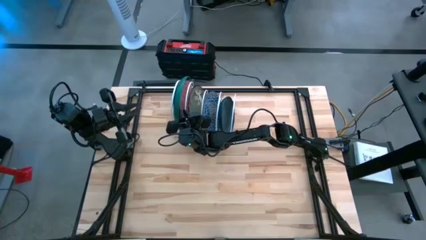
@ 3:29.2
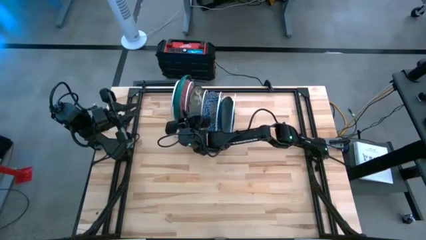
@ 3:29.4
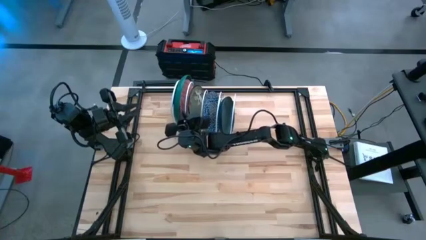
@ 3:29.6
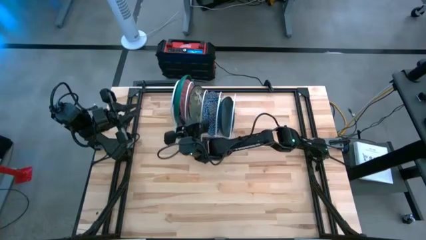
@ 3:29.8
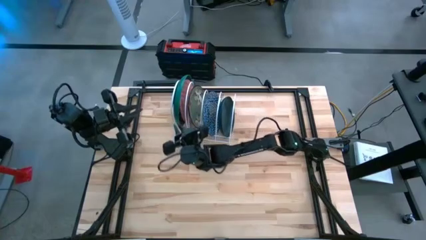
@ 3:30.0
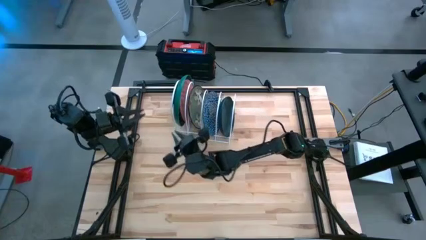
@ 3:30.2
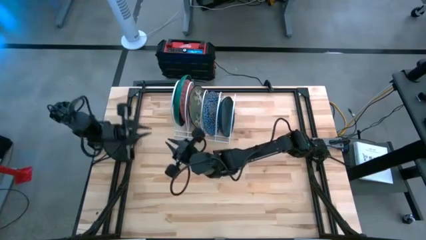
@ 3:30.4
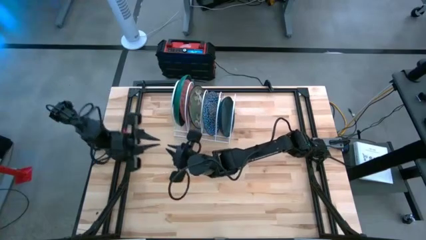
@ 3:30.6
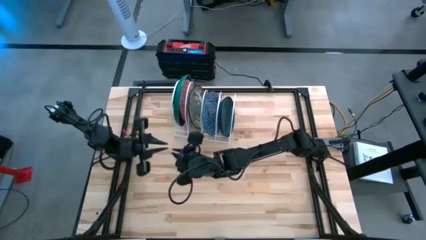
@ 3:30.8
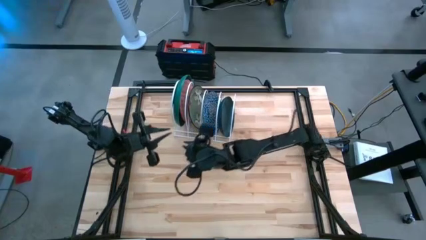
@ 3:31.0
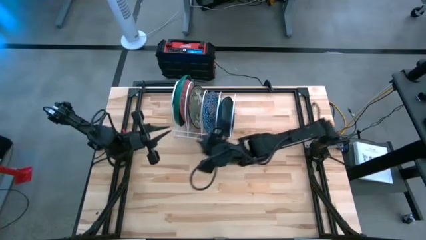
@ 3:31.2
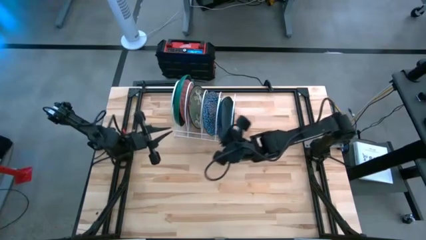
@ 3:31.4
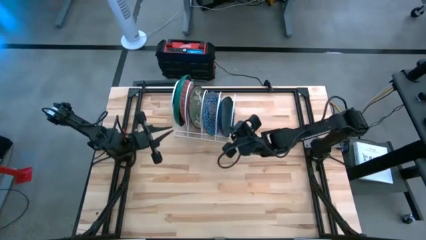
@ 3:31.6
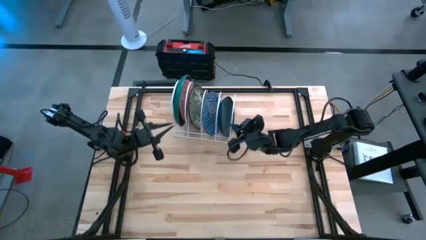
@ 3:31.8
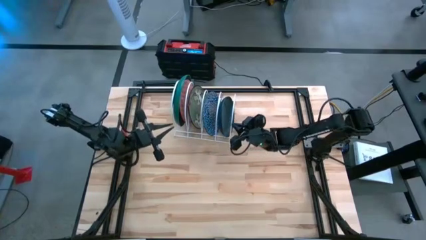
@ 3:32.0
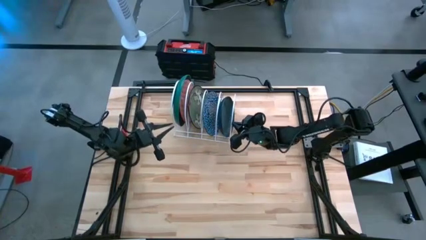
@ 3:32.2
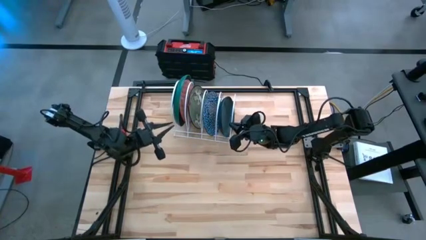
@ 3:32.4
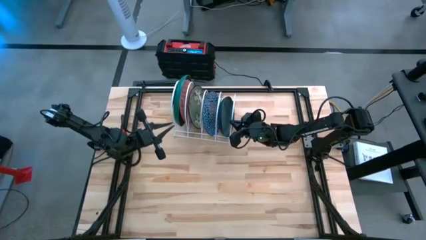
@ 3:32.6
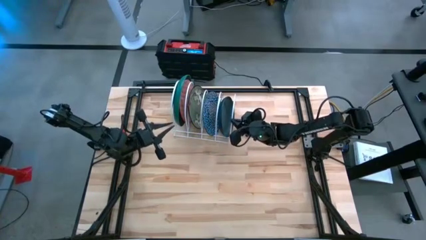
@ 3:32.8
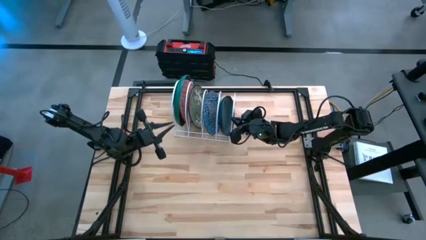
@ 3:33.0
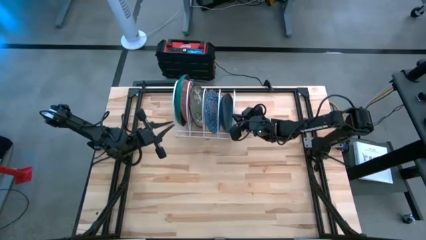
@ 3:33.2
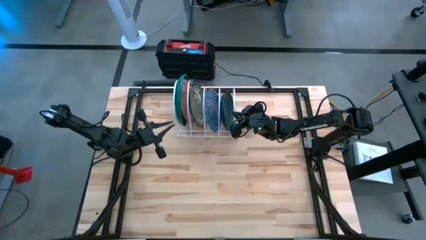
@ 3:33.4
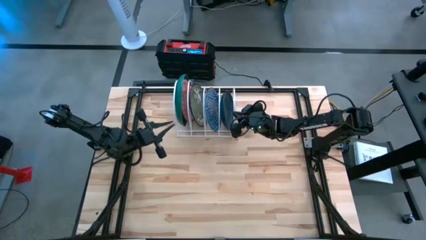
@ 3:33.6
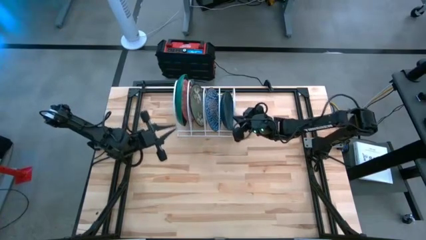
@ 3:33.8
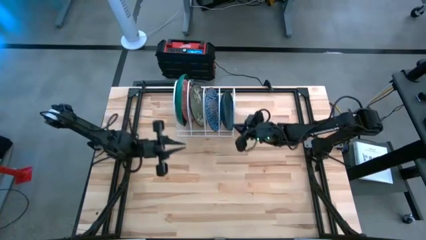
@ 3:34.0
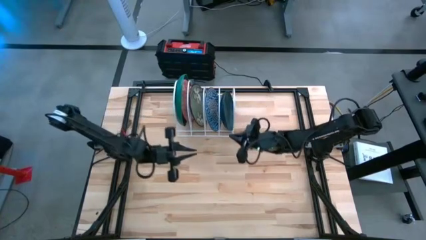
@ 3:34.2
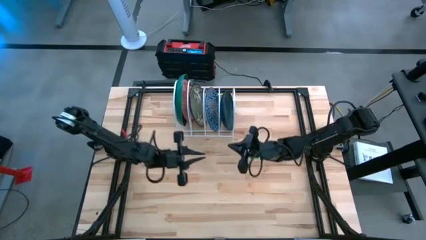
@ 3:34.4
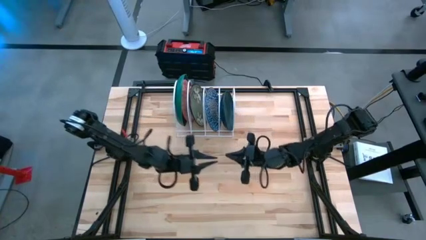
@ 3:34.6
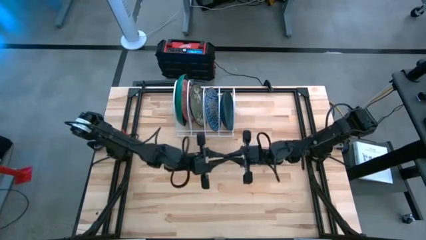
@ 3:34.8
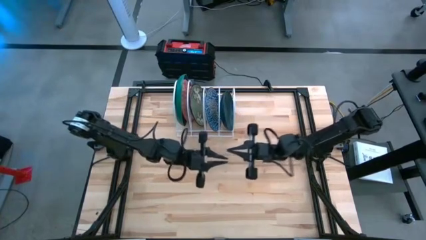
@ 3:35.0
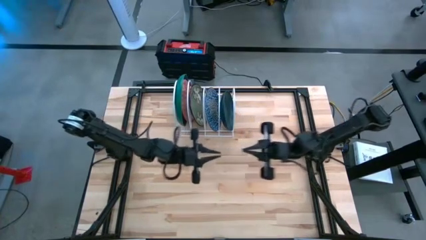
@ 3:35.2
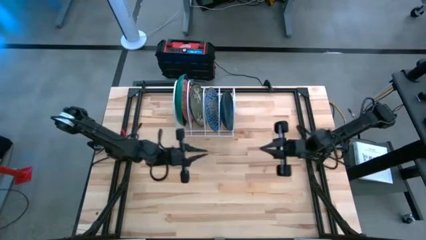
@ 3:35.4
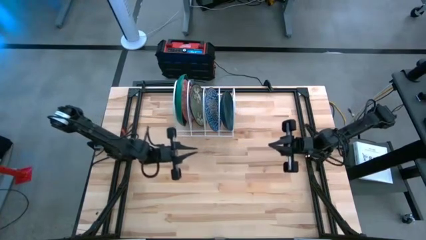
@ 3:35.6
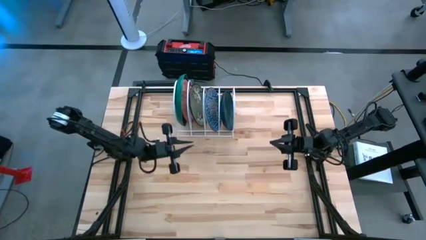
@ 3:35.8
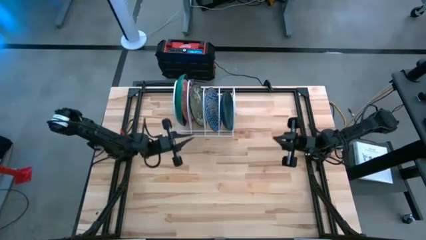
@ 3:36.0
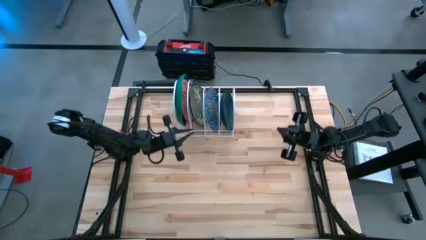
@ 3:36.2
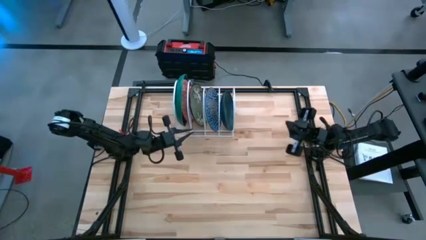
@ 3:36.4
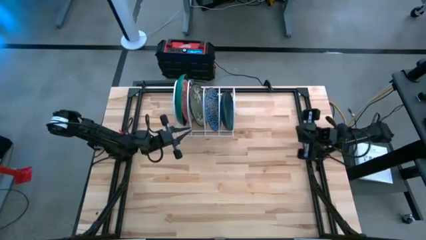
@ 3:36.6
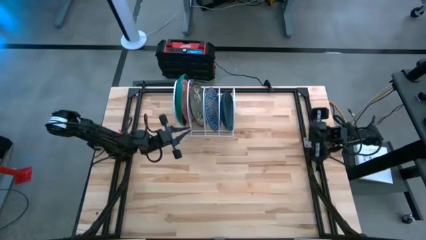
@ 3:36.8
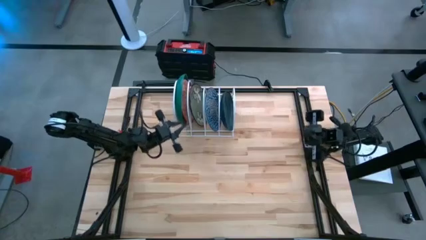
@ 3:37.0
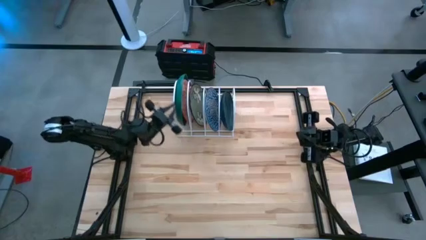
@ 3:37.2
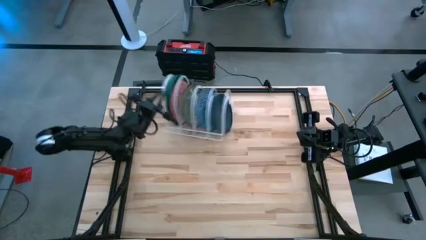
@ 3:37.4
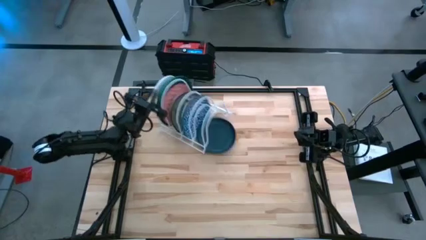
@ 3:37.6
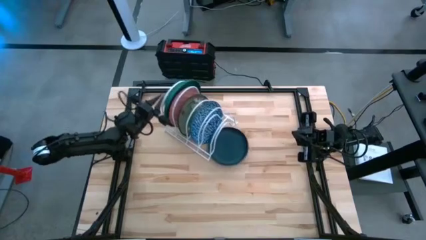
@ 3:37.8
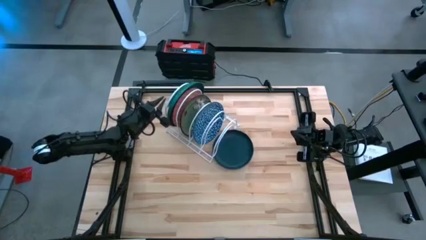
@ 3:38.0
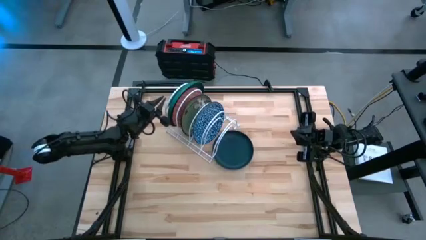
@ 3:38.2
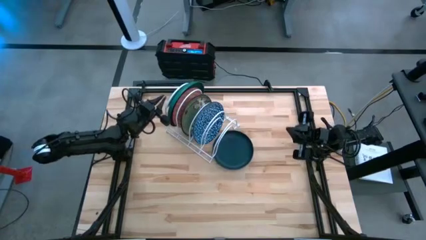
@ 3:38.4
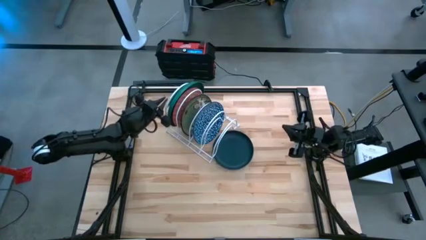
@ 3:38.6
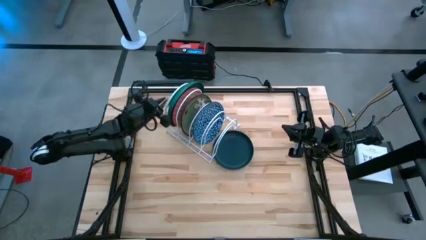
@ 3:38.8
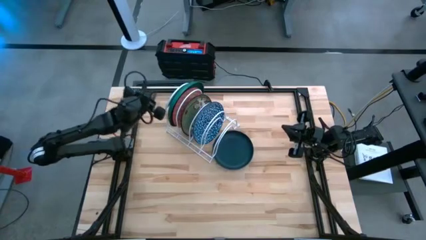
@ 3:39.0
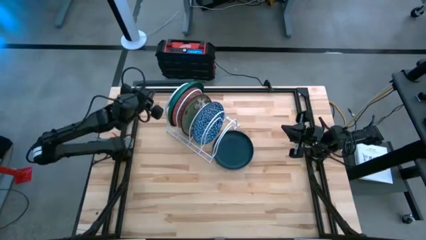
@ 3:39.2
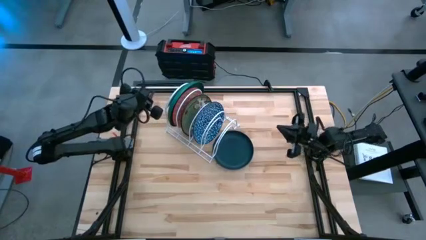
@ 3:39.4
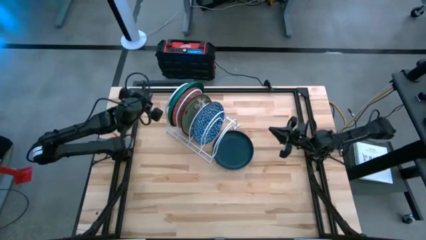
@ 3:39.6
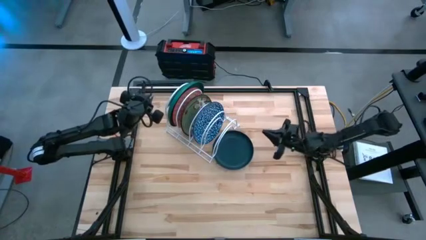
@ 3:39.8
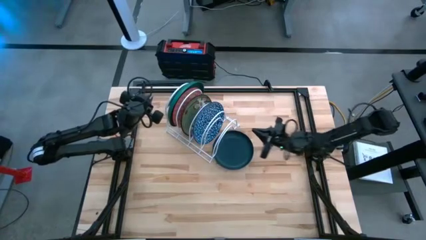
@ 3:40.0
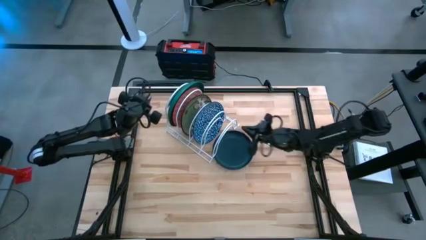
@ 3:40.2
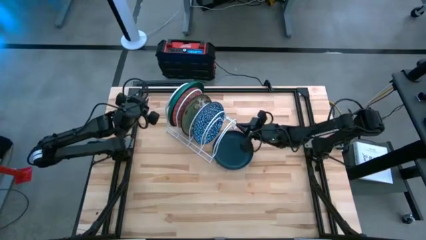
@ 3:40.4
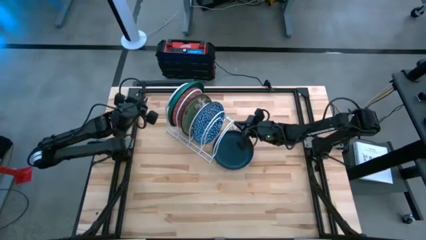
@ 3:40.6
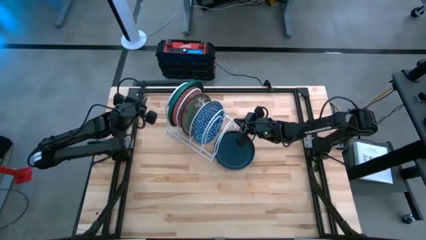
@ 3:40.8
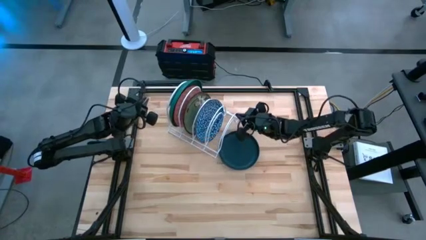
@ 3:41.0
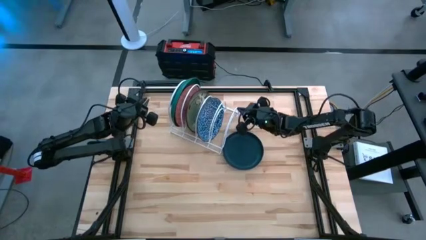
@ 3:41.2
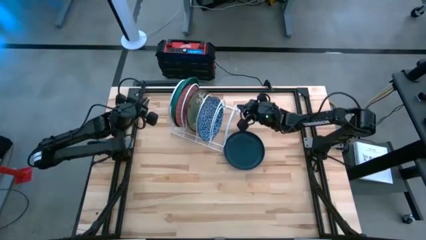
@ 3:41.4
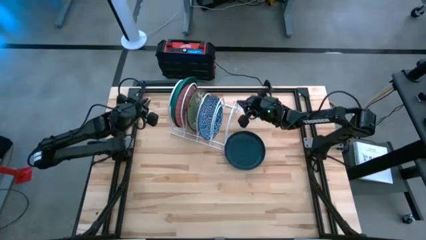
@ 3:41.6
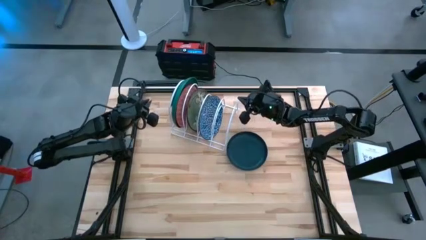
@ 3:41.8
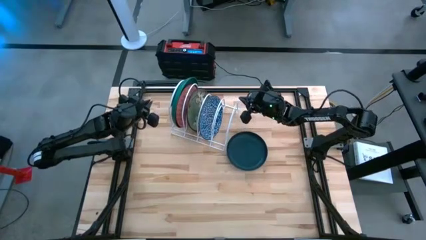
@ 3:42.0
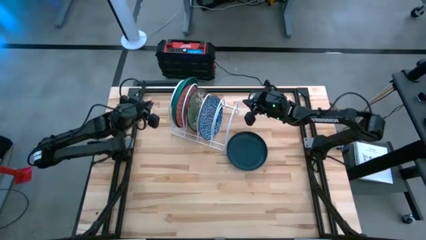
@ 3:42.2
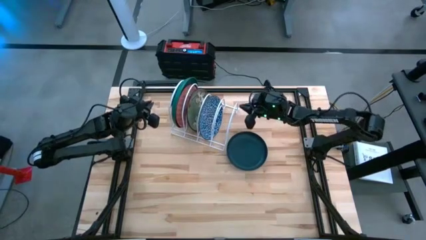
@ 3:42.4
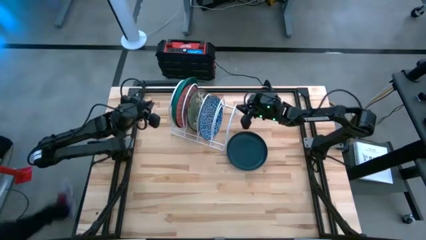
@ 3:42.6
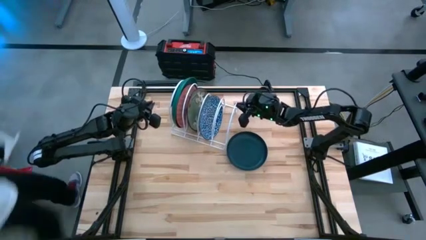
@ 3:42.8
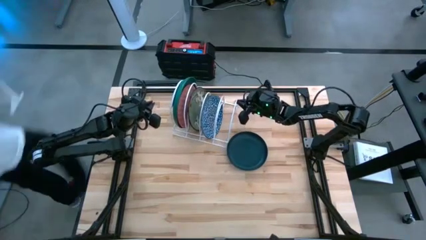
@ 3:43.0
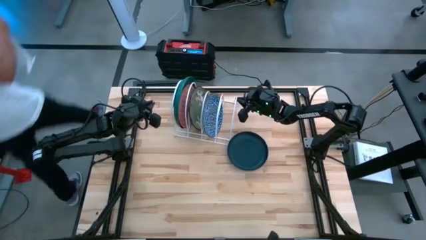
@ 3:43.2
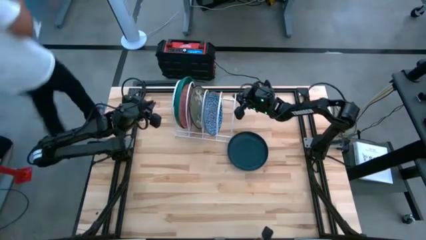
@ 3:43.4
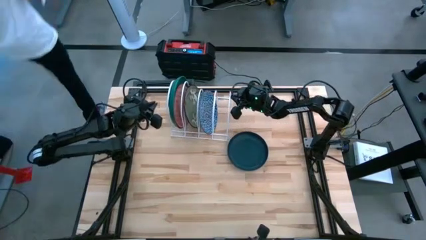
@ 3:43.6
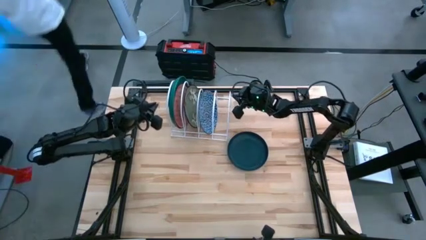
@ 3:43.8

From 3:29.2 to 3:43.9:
Task: Sort dishes
Adjust the dish rack

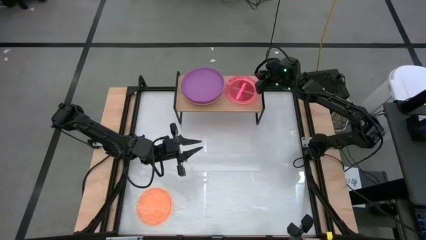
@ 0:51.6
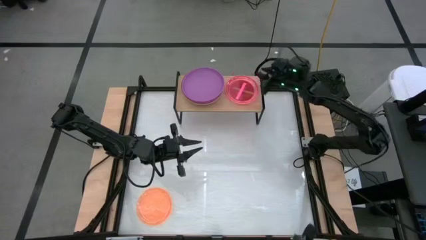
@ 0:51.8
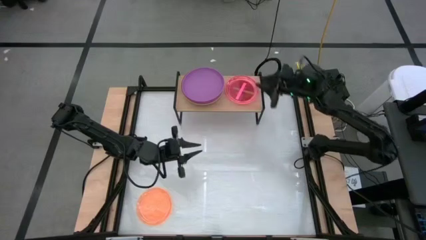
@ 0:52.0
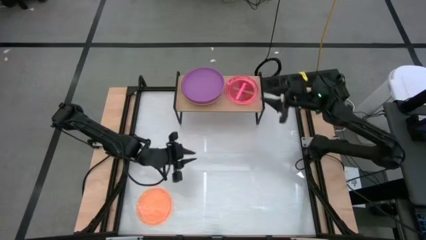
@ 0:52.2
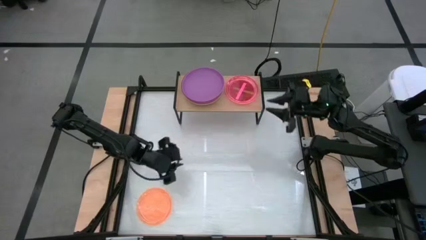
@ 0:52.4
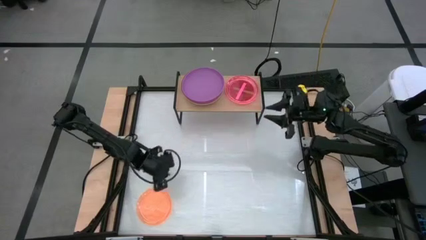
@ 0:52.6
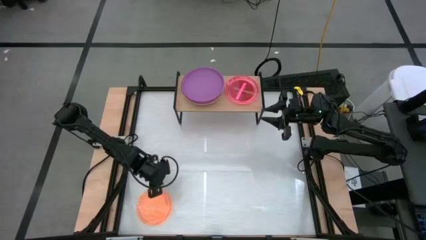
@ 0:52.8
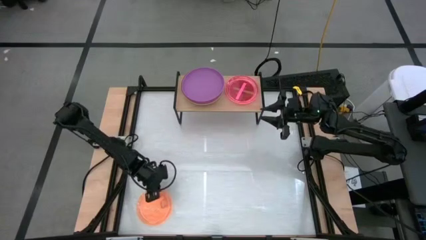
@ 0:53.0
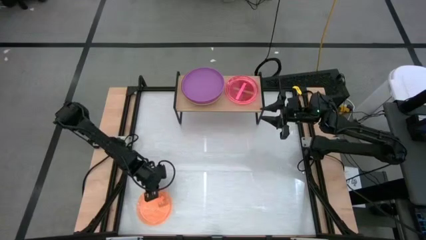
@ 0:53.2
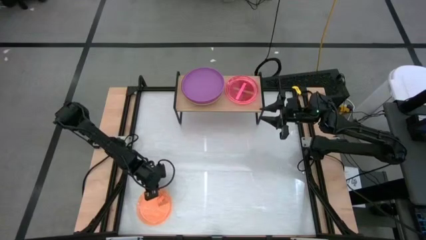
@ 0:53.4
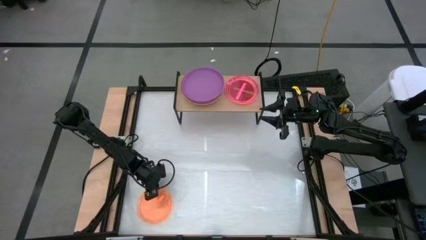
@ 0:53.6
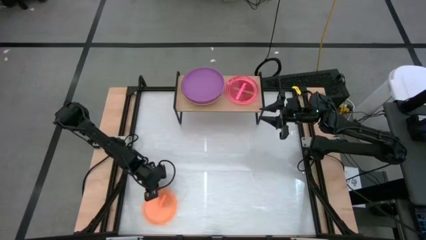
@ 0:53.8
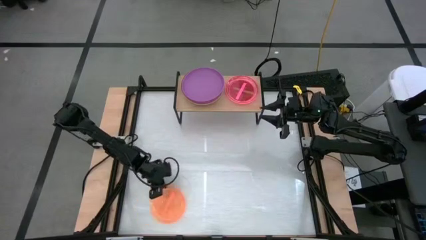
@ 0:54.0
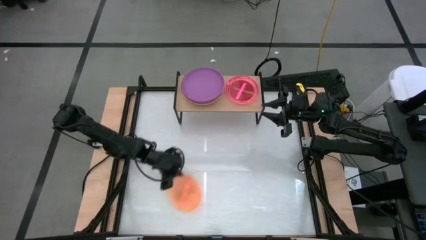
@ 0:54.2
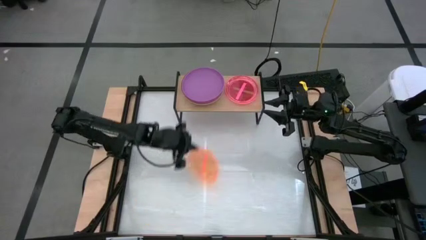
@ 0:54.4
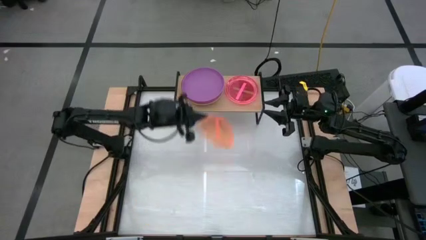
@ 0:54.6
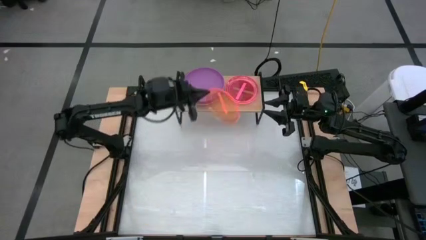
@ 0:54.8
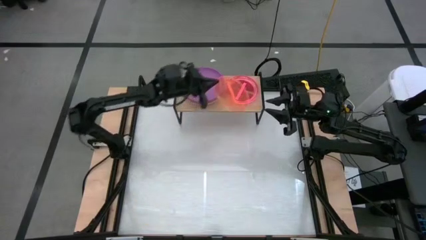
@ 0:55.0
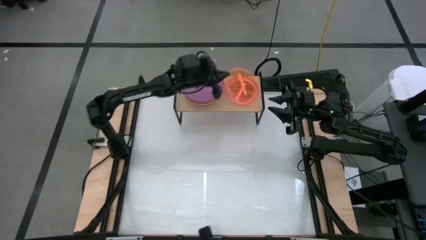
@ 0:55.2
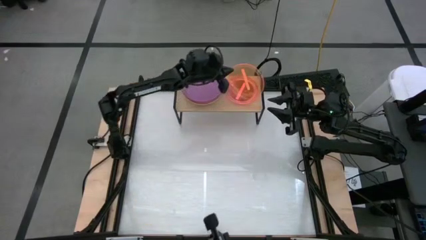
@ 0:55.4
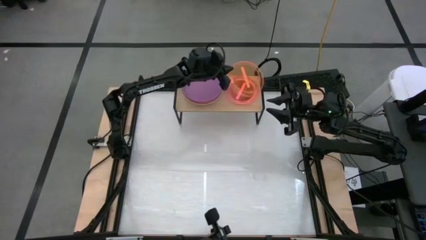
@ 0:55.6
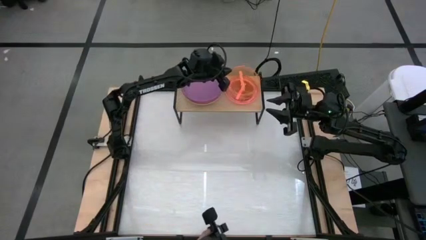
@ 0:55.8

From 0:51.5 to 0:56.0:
Task: Place and stack plates onto a shelf
Stack the light orange plate on top of the light pink plate on the shelf
